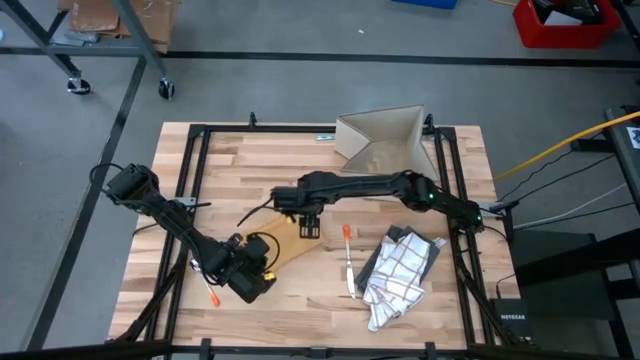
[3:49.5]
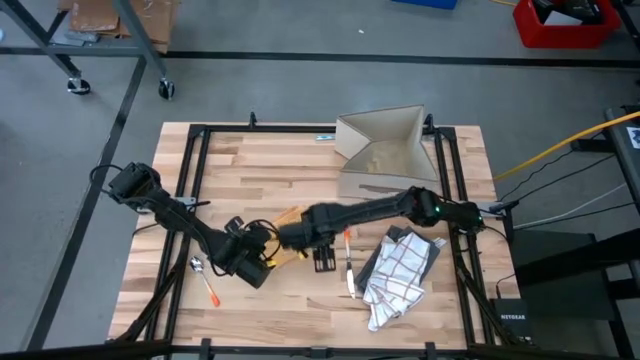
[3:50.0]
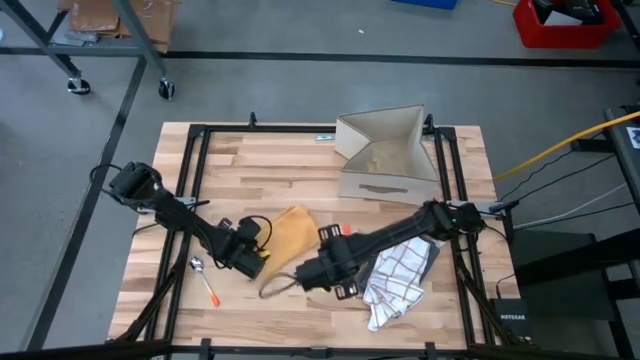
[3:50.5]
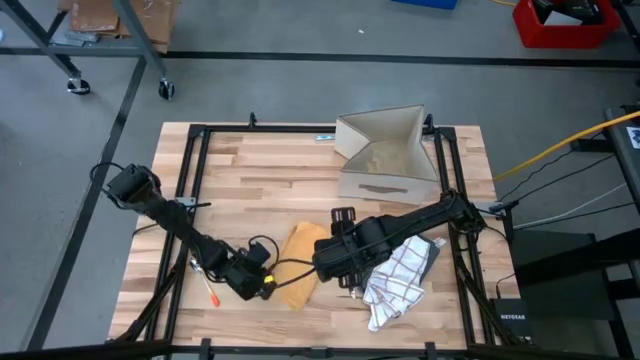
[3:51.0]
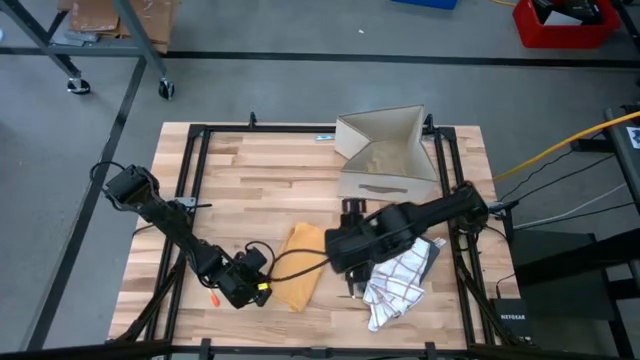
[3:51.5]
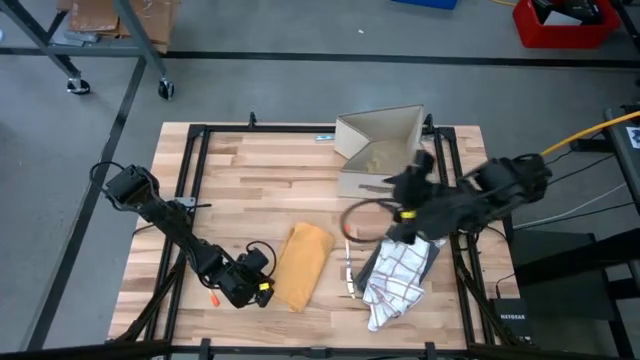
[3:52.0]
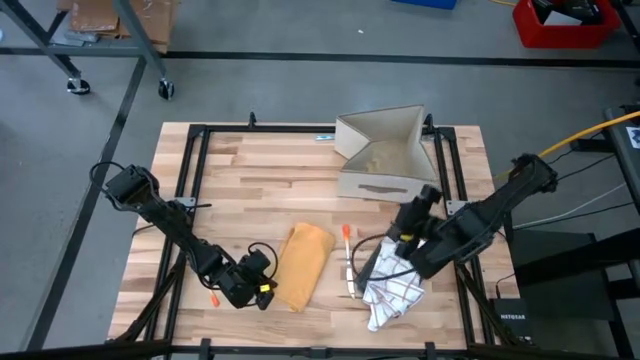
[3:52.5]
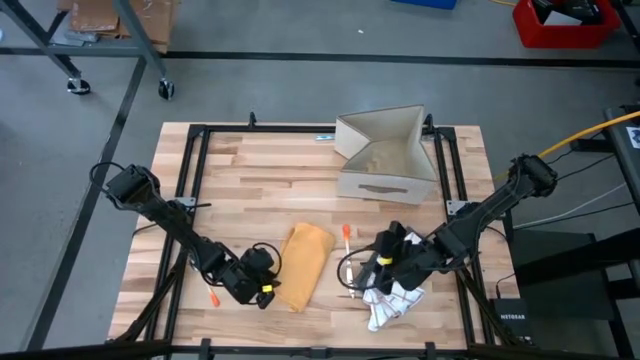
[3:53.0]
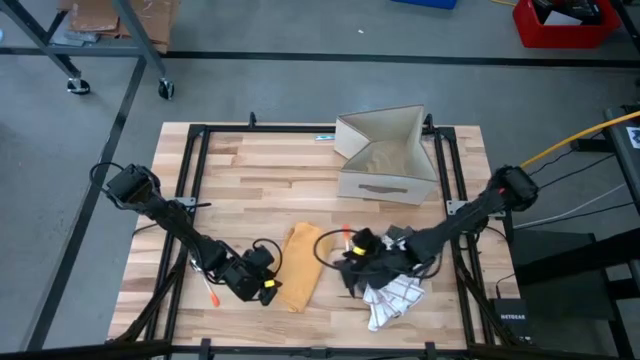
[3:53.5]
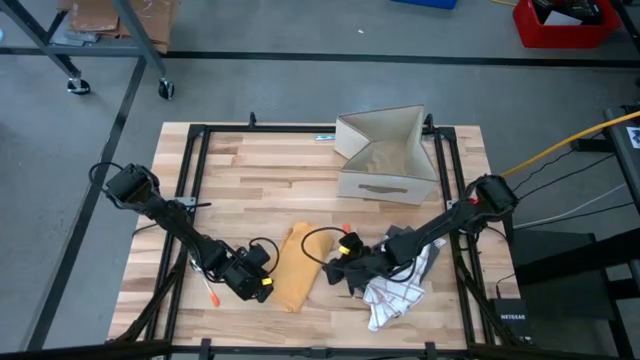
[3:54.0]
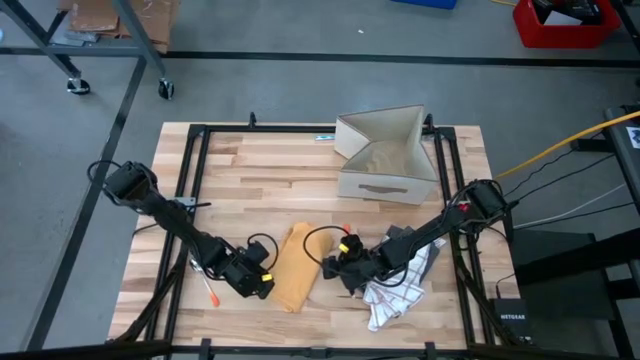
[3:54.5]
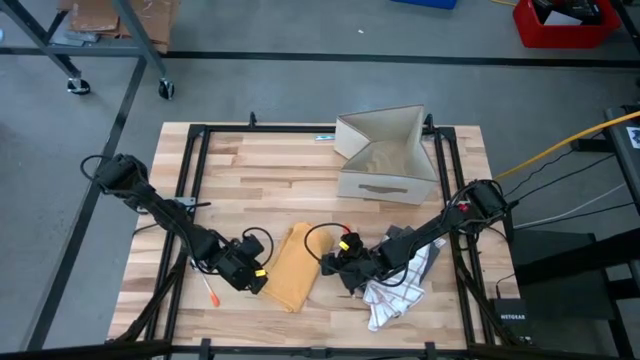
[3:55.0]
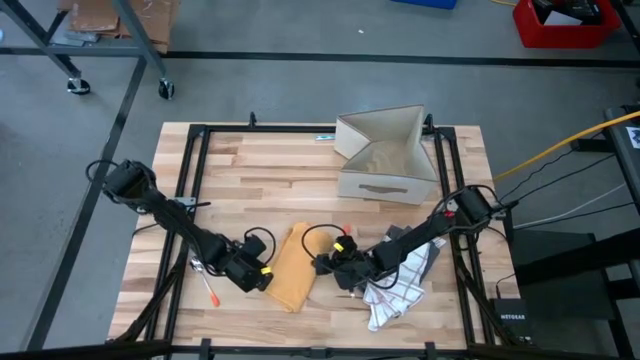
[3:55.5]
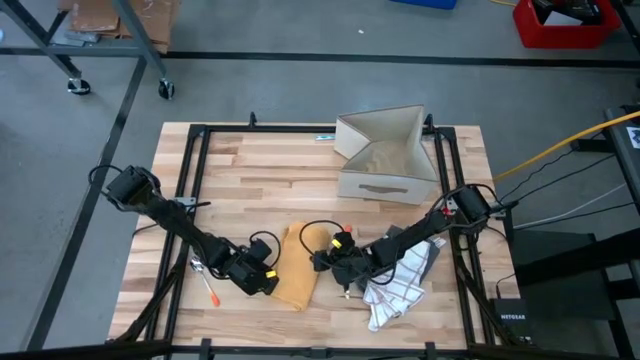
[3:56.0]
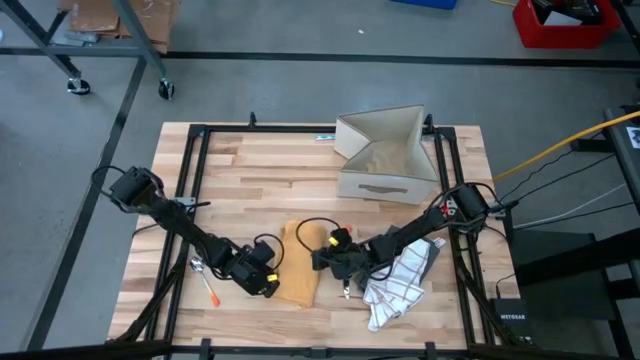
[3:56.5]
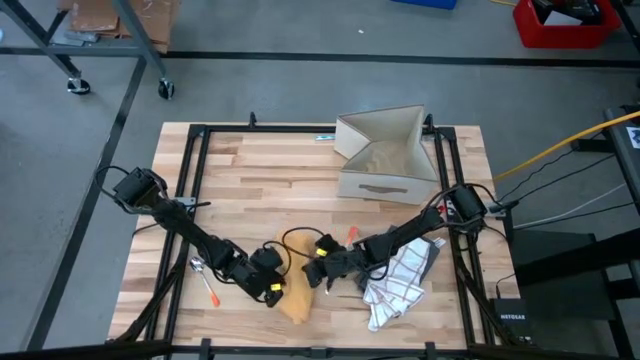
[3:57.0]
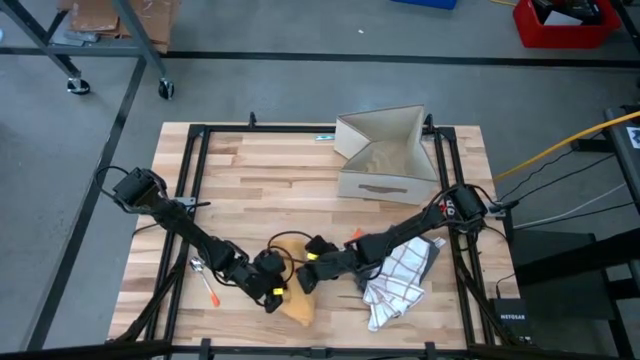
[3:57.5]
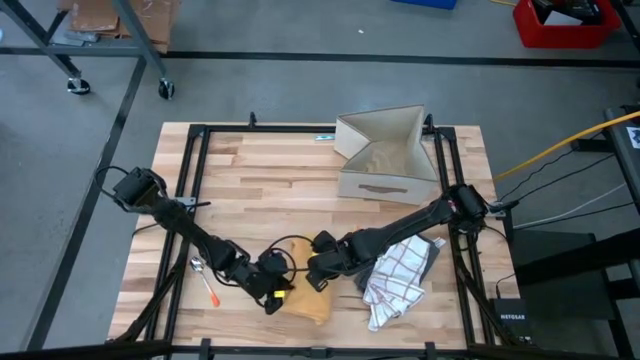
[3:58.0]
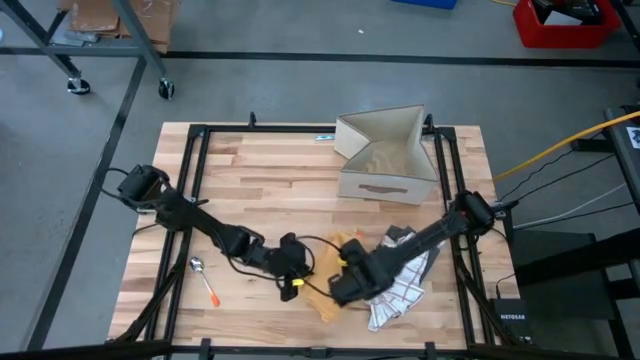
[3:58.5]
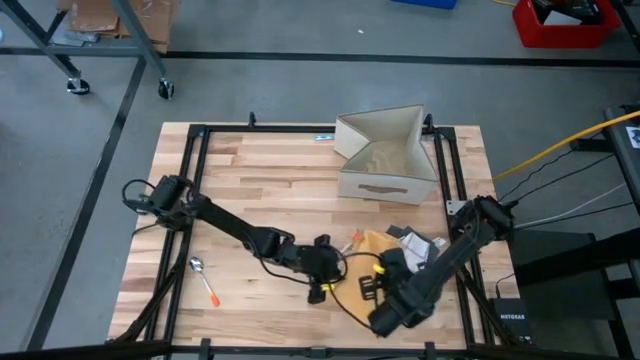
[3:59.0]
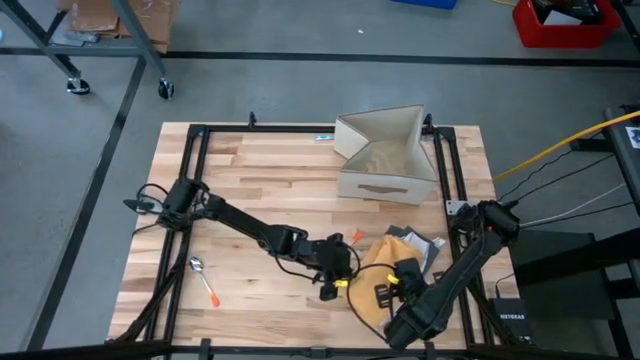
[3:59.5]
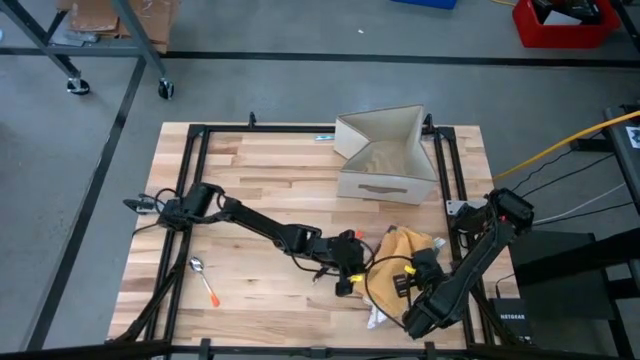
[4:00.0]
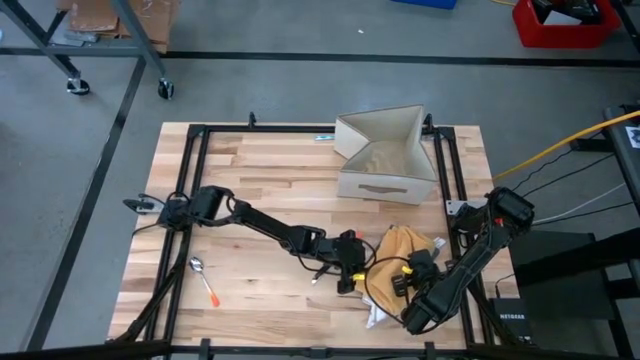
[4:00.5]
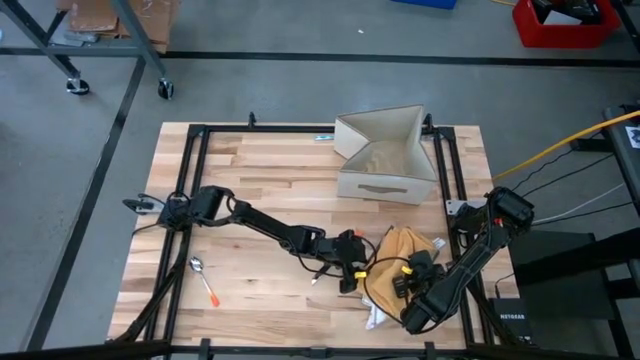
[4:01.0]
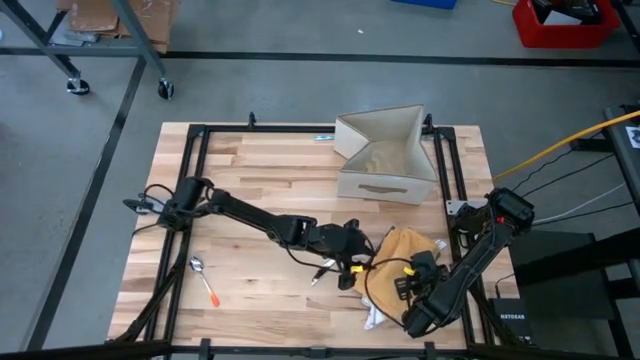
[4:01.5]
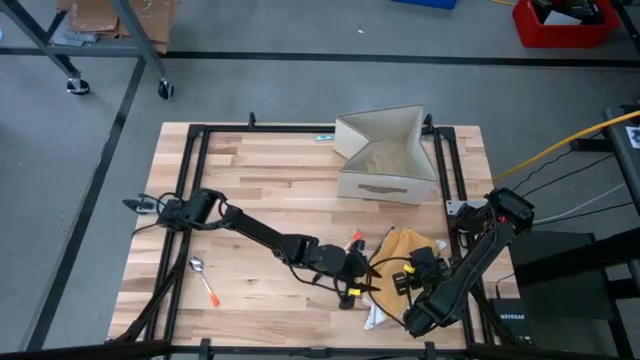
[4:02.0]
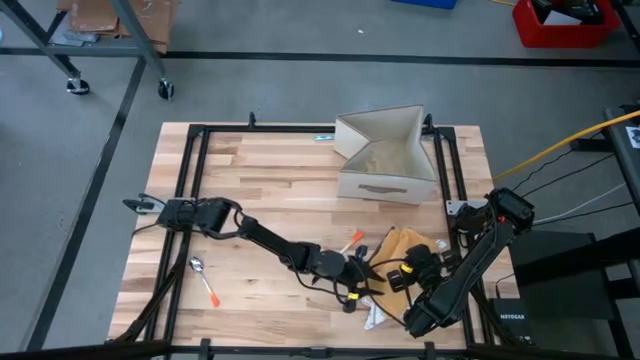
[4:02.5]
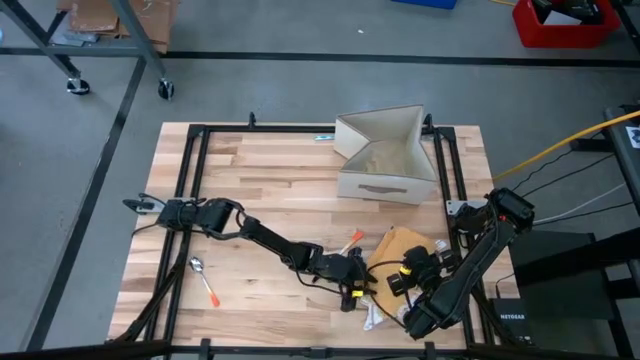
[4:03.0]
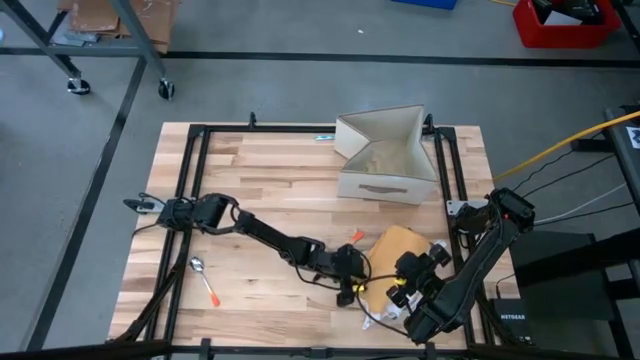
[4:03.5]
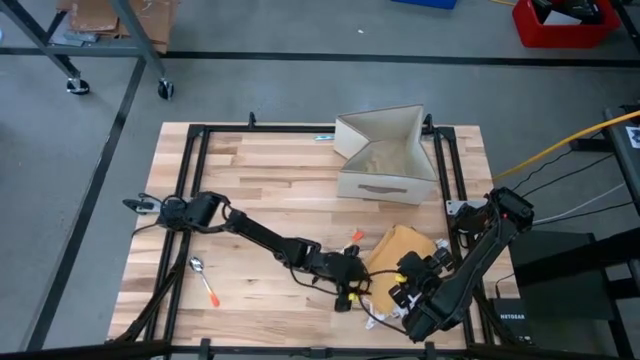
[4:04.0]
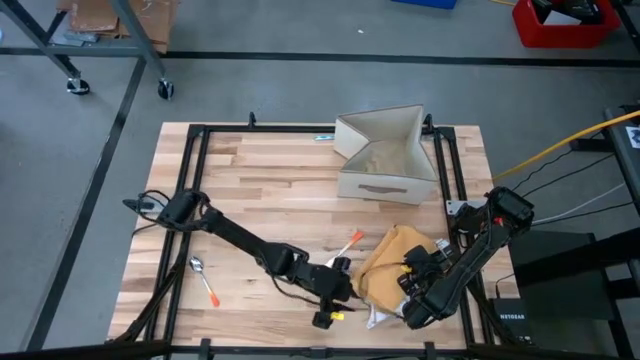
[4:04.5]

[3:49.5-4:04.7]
Task: Fold towel
Stack the orange kitchen towel onto of the white kitchen towel

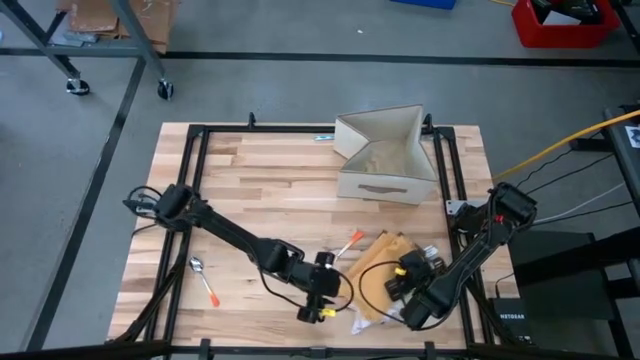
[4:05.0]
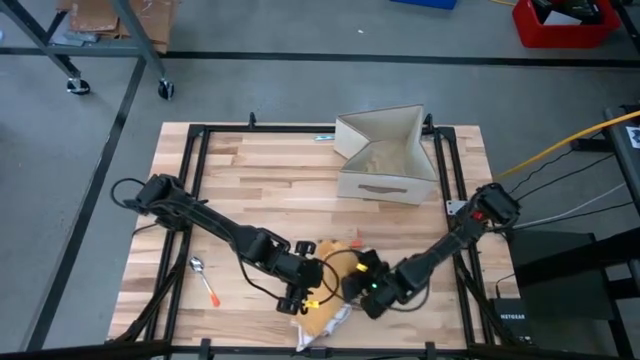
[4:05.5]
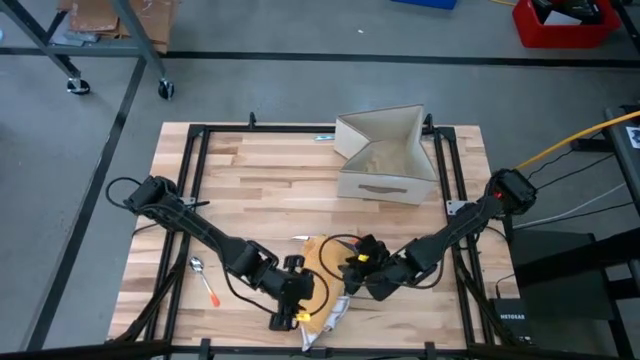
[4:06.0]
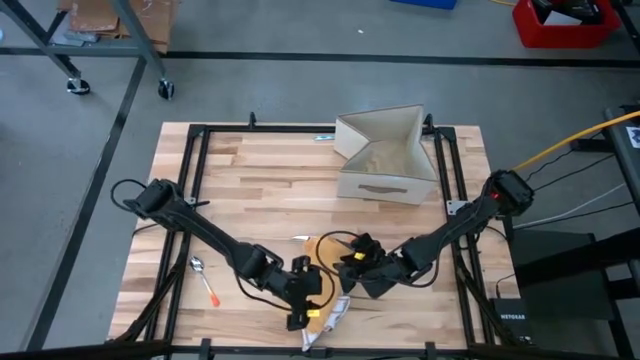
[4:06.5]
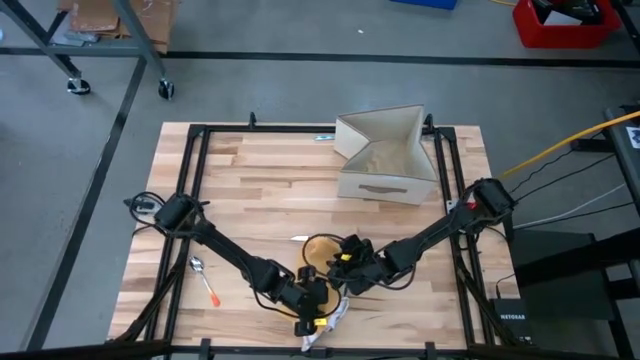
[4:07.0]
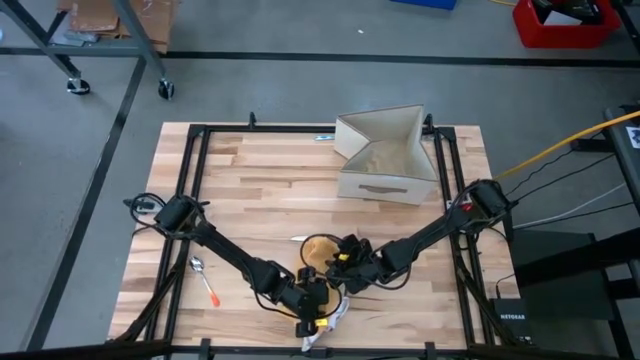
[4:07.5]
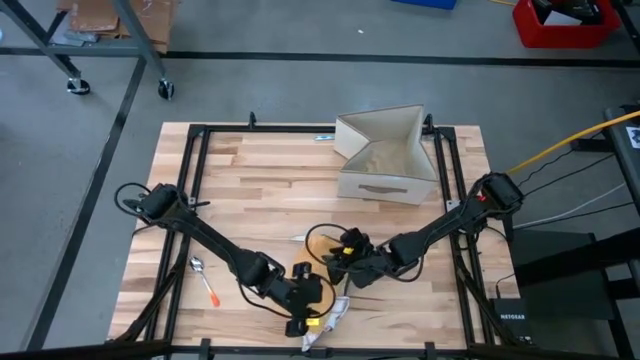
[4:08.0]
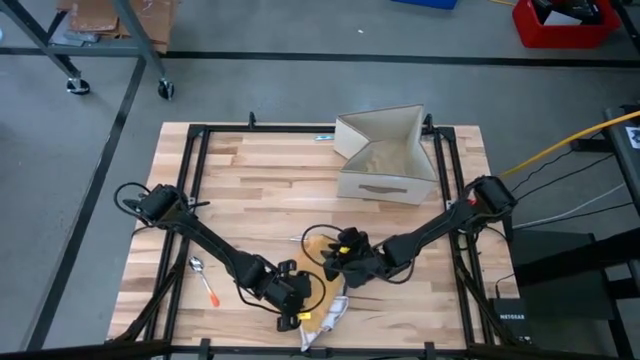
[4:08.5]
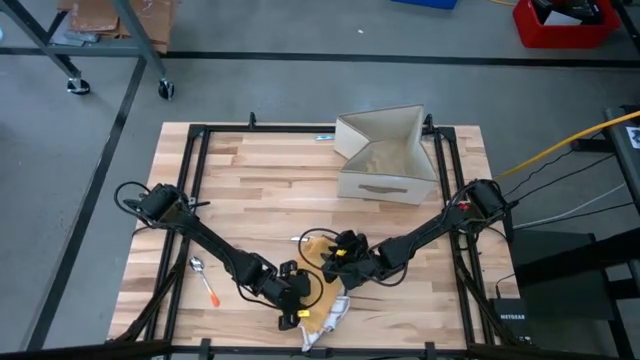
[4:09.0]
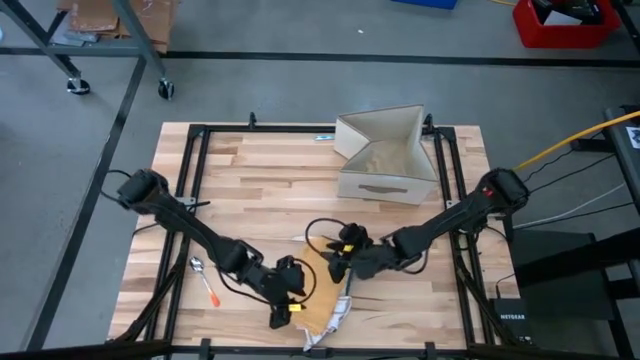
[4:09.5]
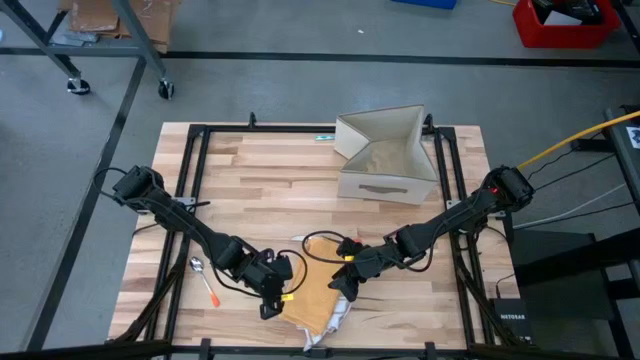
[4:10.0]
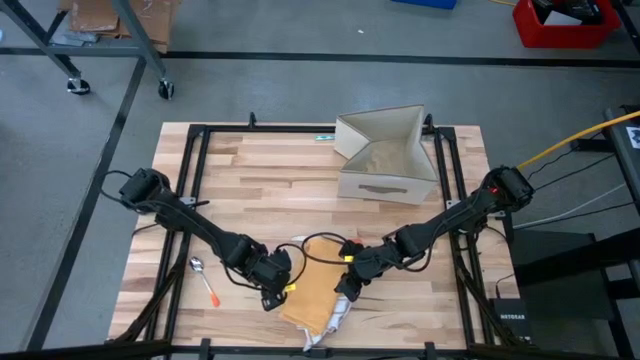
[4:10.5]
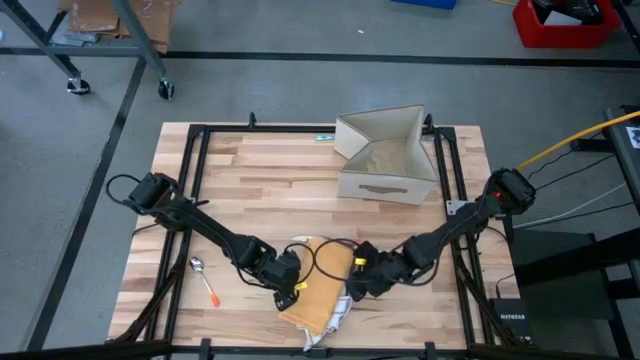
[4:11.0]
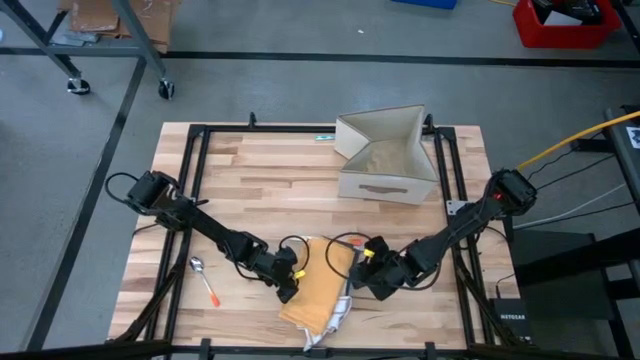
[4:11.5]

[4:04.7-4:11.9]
Adjust the kitchen towels
